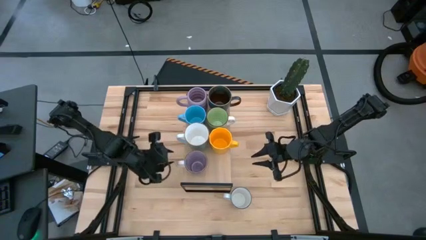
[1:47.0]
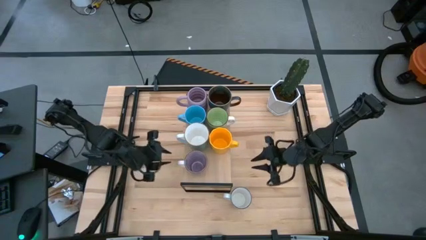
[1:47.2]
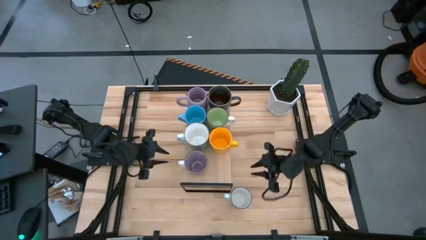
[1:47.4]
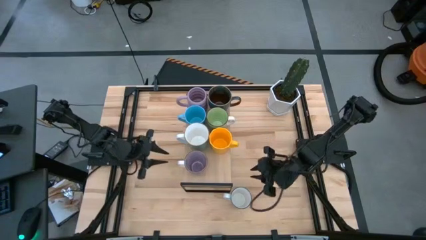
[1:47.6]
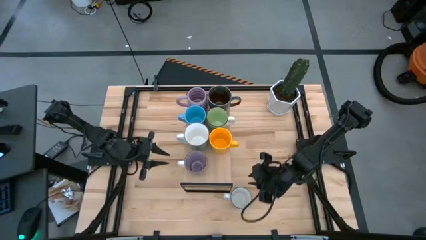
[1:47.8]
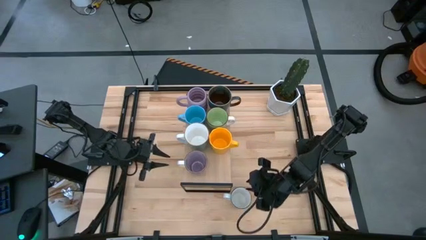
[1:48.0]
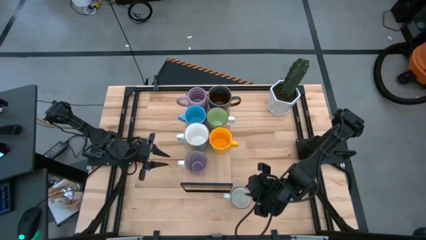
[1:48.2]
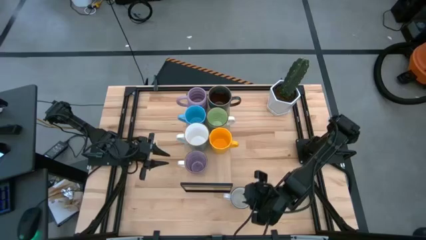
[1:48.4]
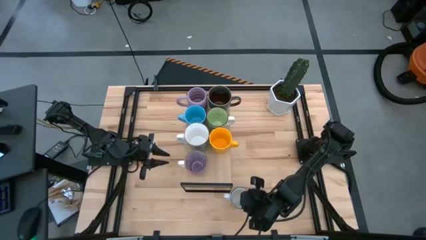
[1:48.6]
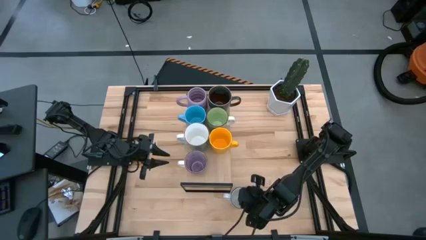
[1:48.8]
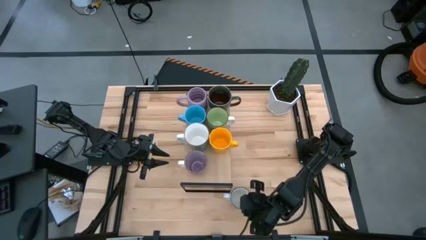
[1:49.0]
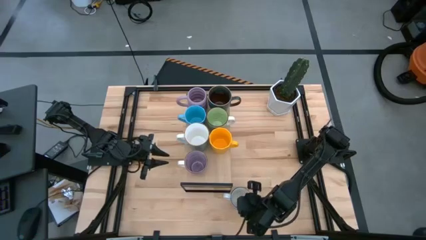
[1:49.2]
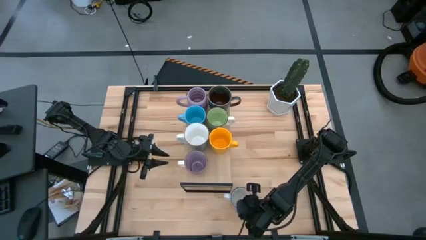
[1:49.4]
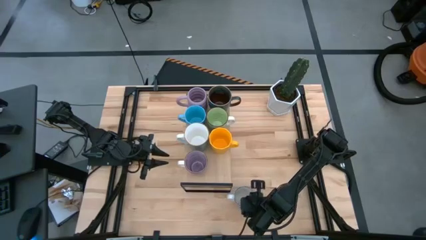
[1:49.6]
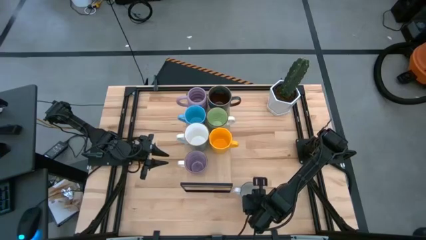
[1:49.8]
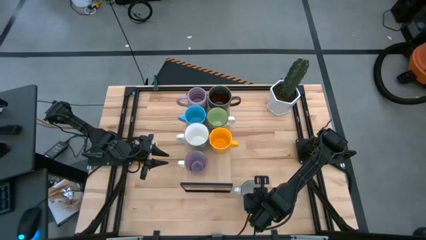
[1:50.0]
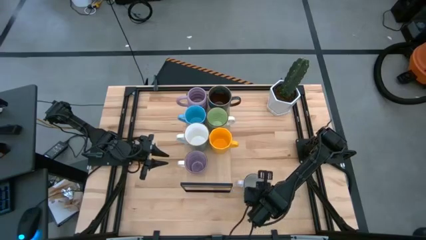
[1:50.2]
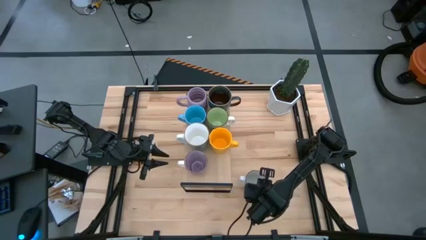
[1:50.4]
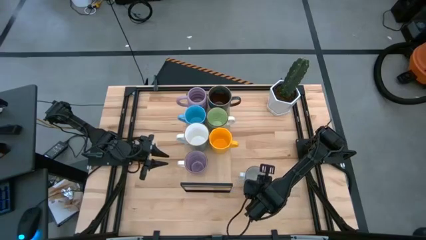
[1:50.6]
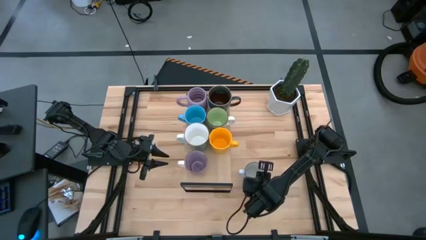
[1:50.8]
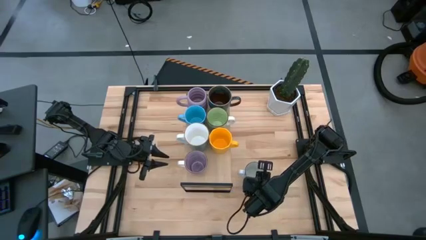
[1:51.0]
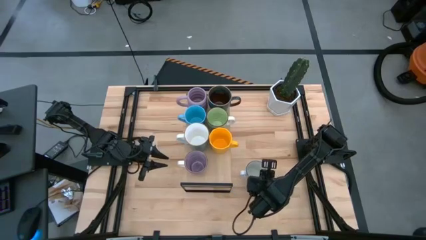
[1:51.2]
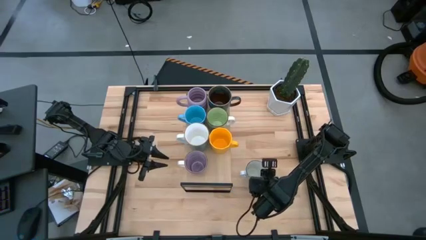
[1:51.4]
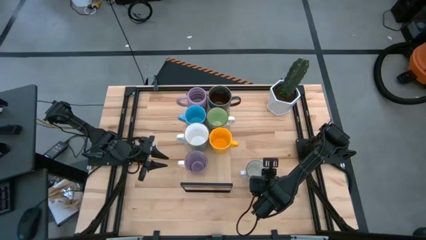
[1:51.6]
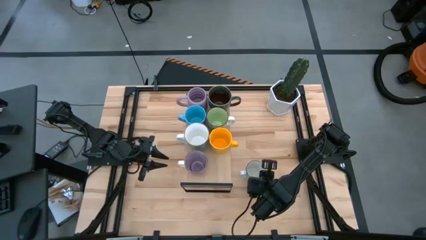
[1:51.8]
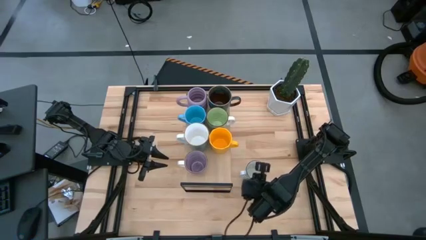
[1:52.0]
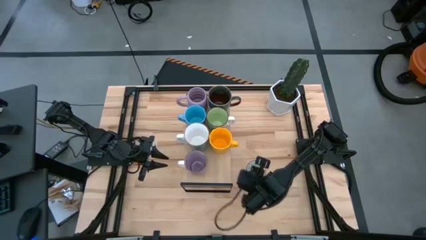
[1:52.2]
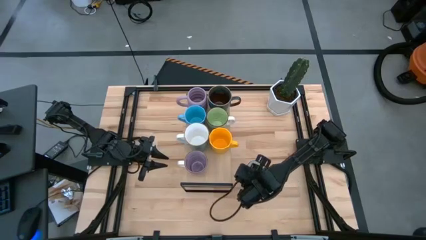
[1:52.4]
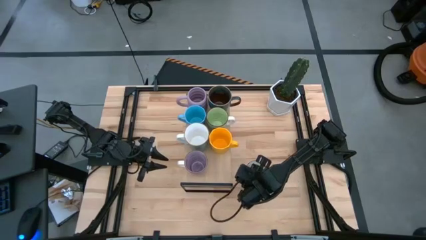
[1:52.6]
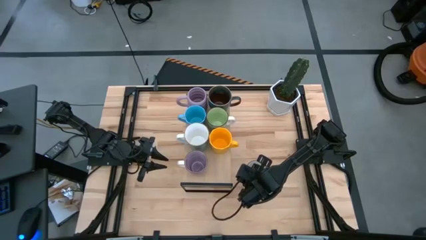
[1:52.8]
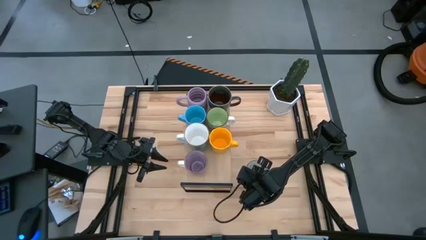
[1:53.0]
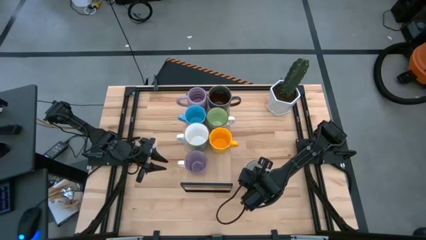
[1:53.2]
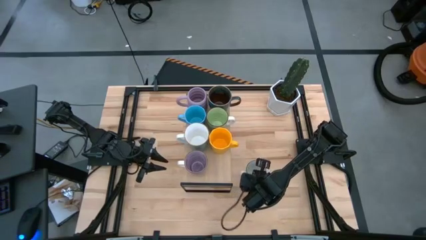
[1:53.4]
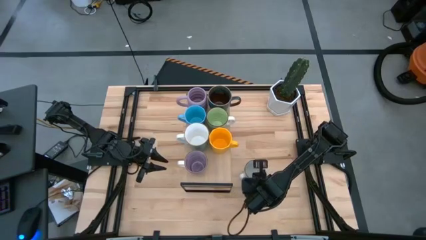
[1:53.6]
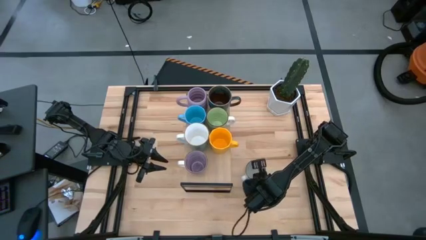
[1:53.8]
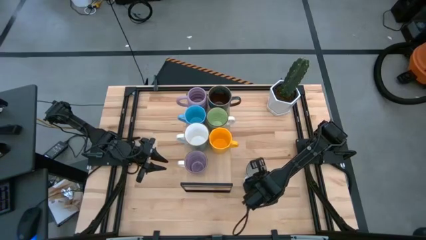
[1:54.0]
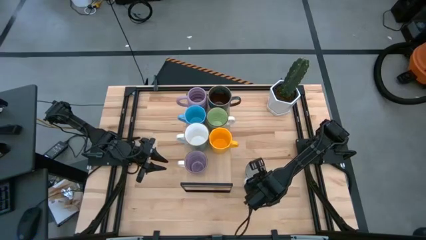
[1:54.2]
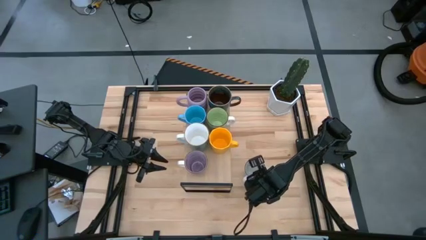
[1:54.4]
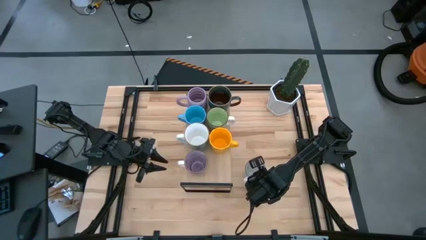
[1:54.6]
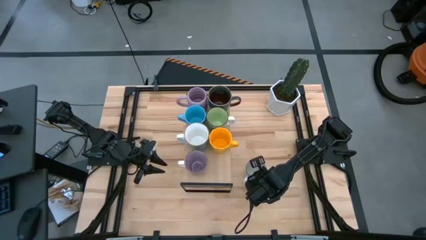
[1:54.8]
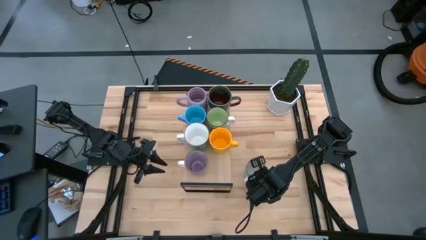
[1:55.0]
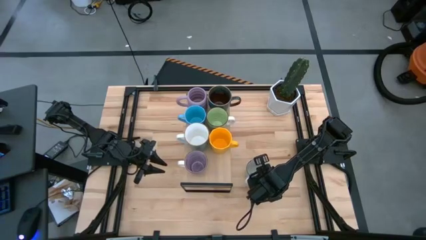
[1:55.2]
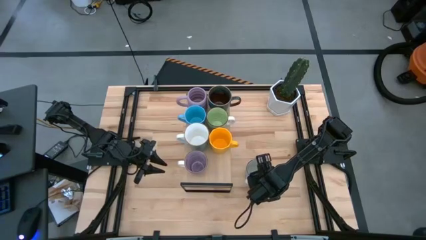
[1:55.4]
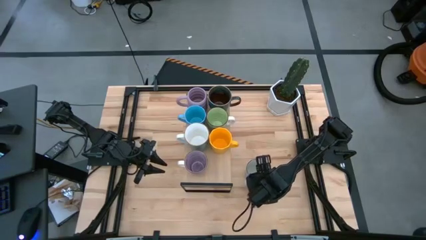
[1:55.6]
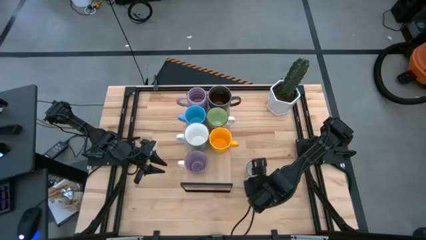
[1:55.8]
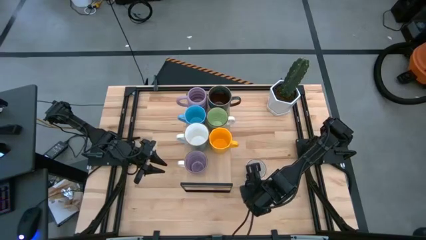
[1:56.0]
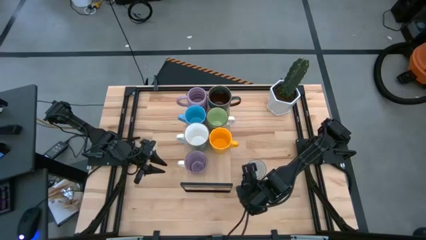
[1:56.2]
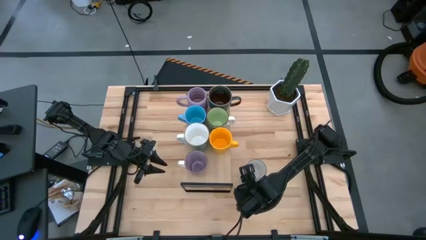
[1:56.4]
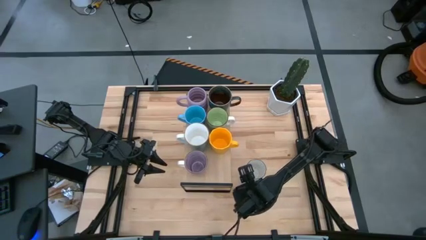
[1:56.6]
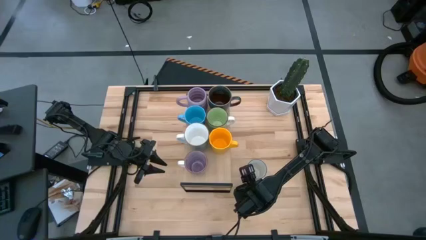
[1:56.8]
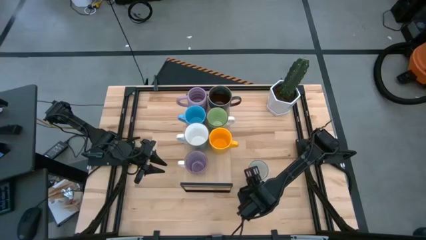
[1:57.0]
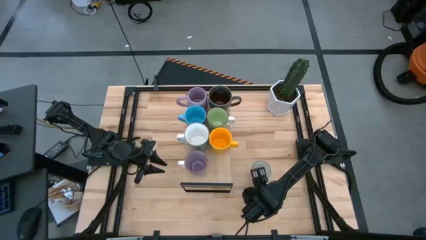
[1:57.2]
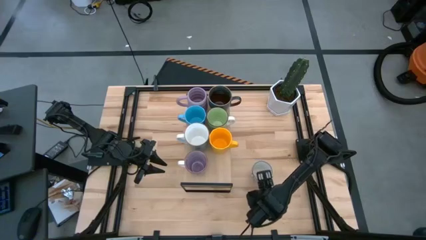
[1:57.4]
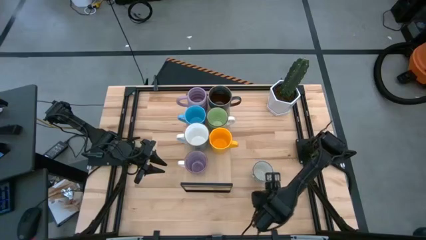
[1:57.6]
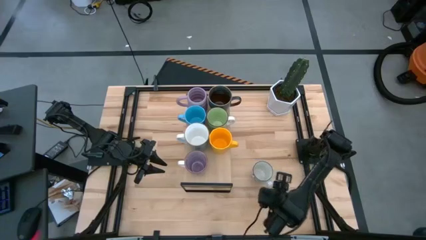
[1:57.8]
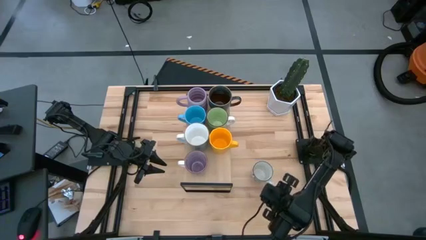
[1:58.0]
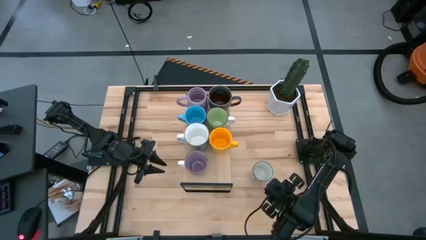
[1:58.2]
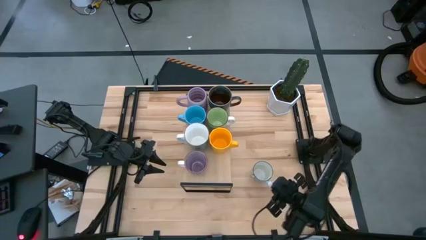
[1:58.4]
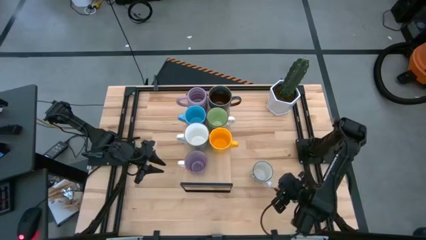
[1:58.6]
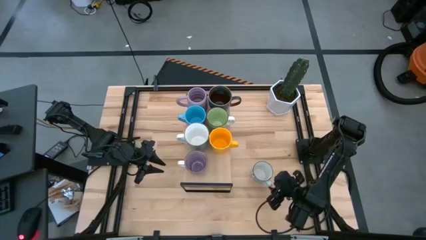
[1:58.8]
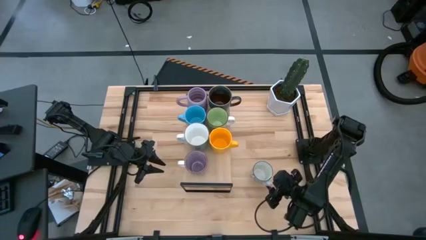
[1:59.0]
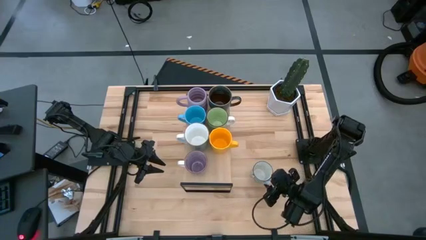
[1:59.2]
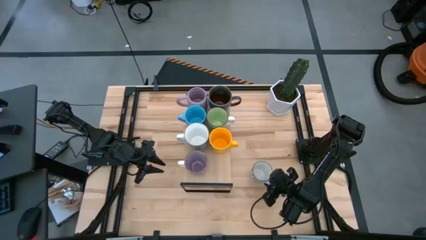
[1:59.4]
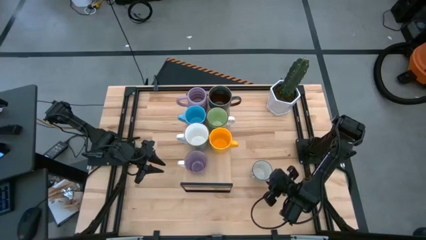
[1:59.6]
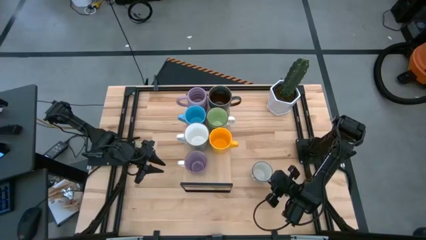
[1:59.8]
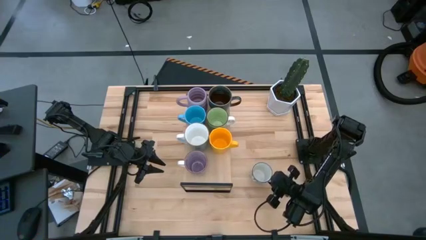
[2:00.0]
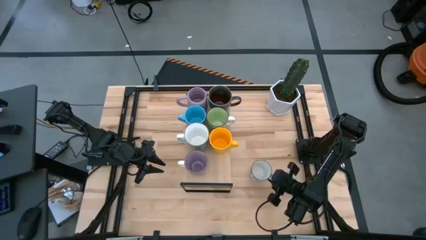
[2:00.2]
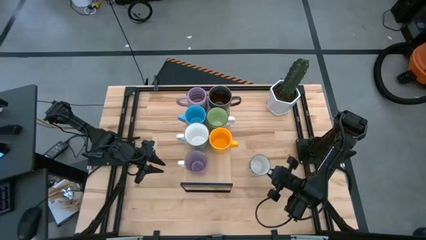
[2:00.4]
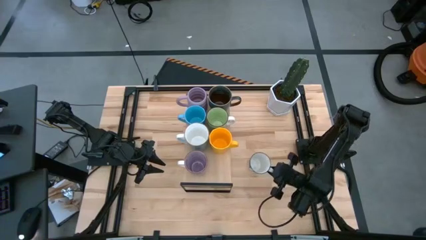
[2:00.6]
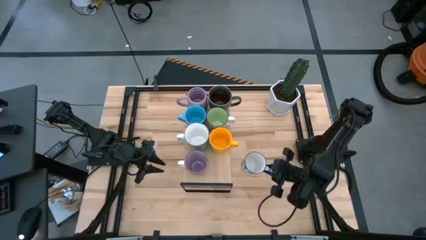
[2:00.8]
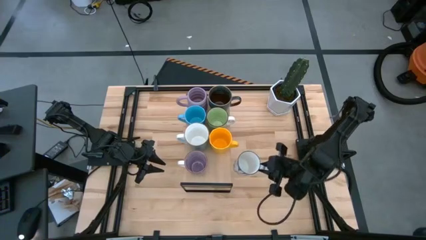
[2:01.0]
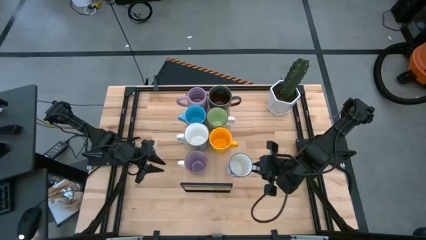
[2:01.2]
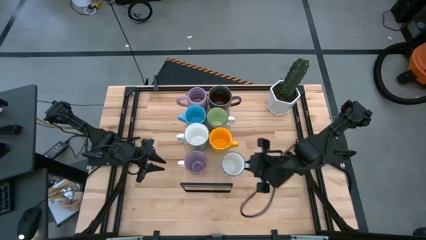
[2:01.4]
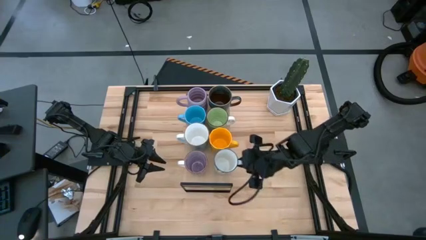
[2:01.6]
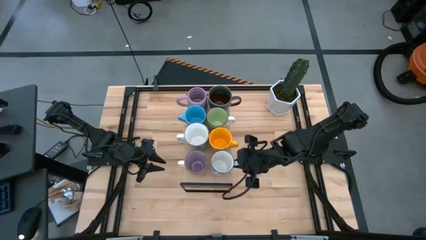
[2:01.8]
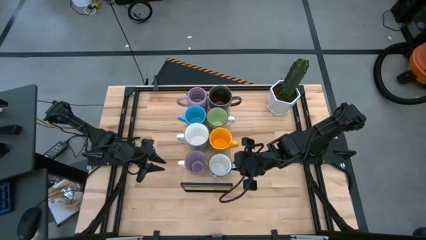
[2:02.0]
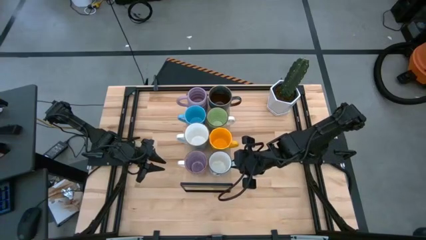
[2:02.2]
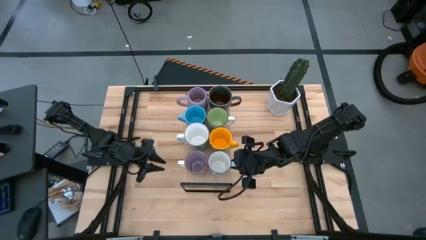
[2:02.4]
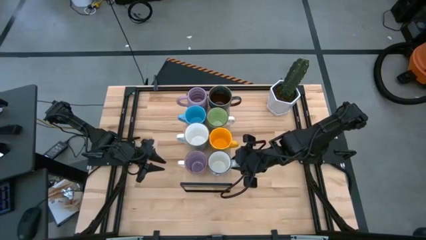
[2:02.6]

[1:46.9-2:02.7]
Task: Place coffee mugs
Put the white blue mug on the shelf

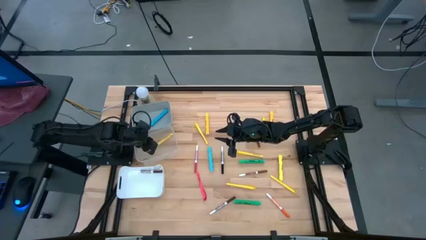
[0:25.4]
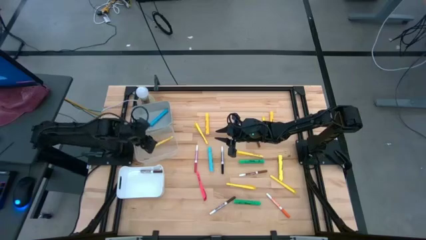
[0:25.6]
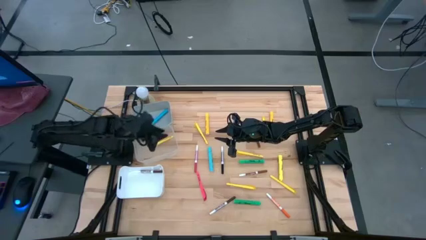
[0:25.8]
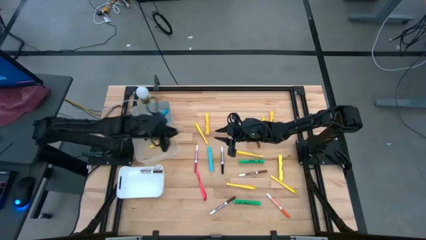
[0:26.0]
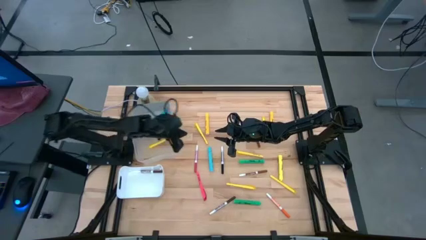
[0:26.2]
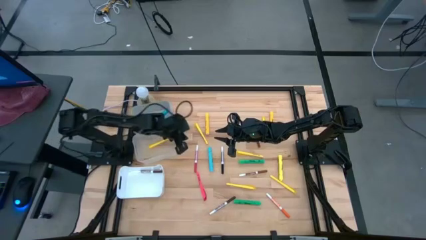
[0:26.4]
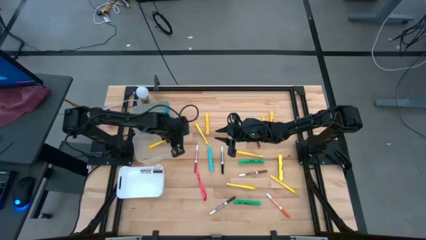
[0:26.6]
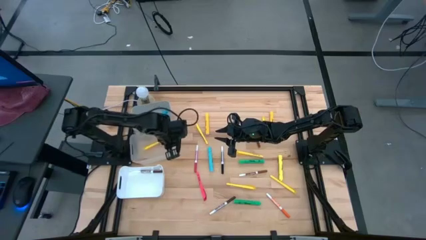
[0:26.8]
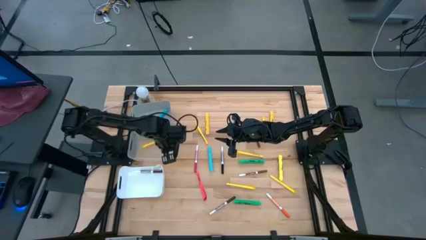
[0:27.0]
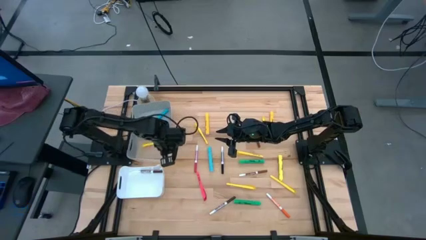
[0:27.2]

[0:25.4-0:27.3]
Task: Pick & Place Markers
Adjust the transparent bin
